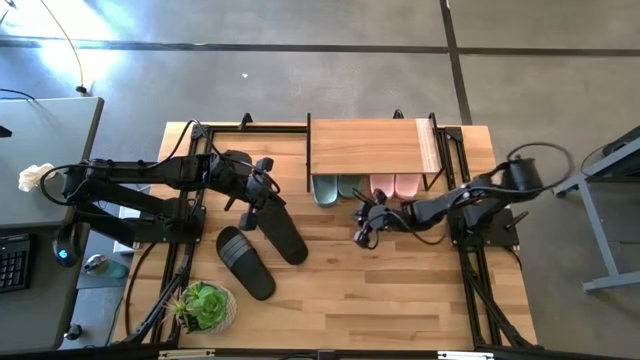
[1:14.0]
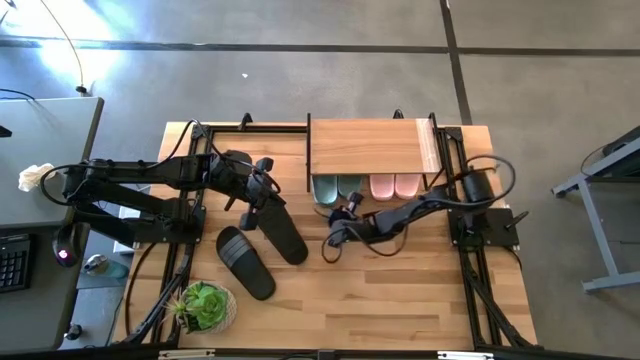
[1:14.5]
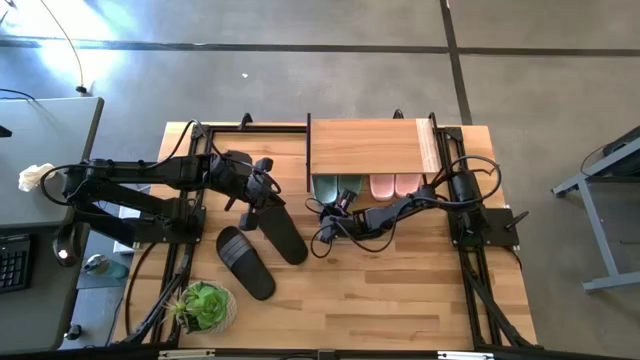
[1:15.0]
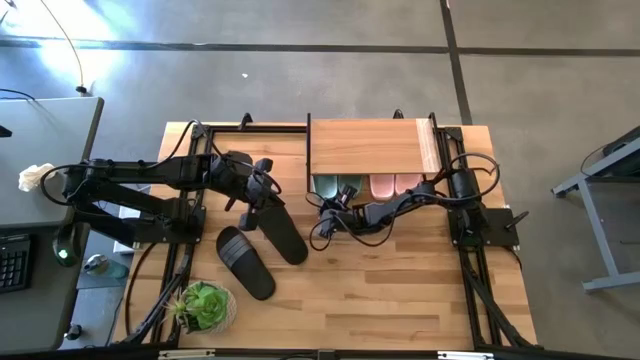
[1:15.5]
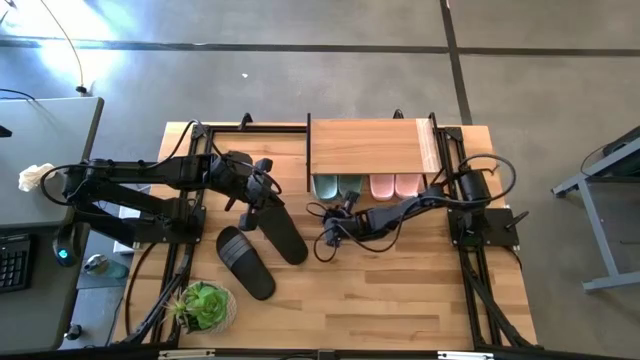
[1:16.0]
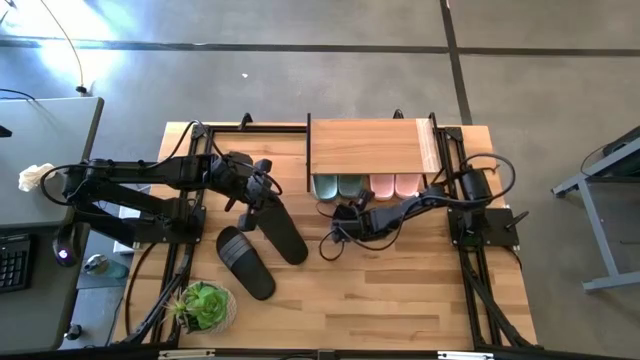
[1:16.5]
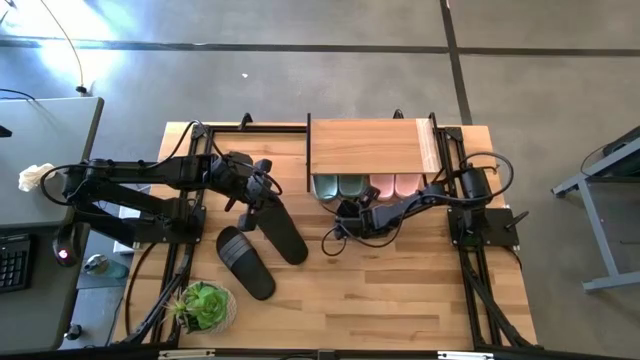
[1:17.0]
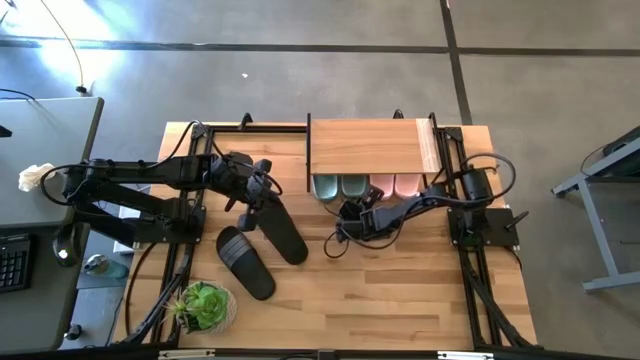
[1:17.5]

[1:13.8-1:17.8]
Task: Pick and place slides into the shelf
Adjust the pair of green slides

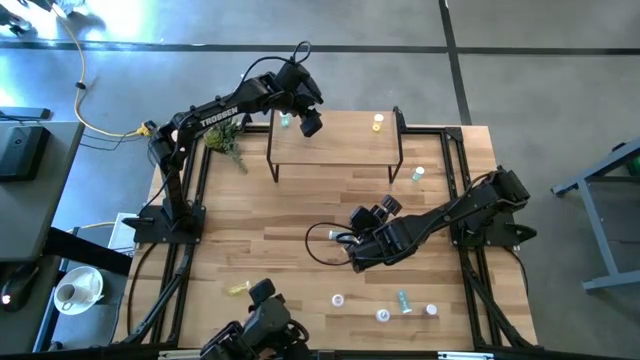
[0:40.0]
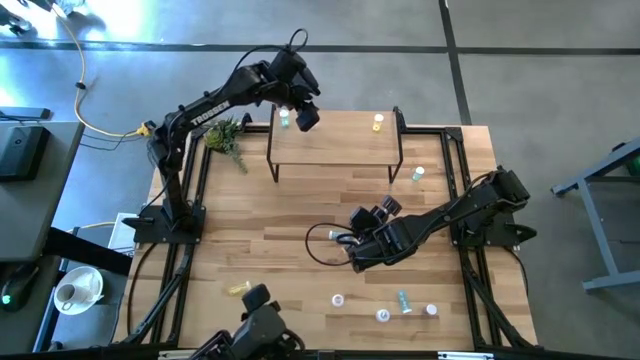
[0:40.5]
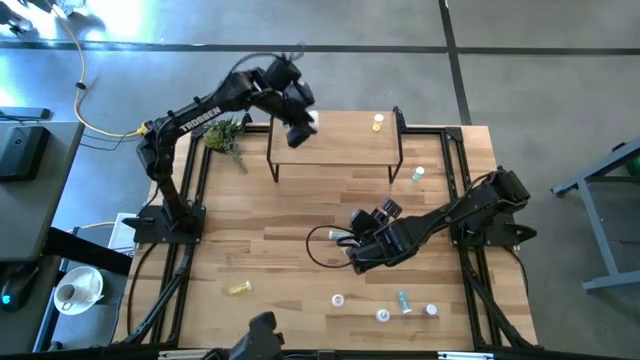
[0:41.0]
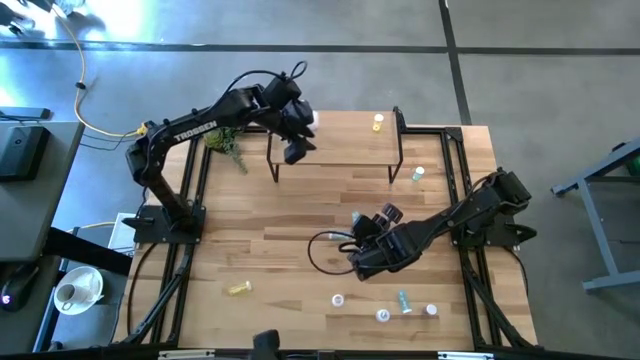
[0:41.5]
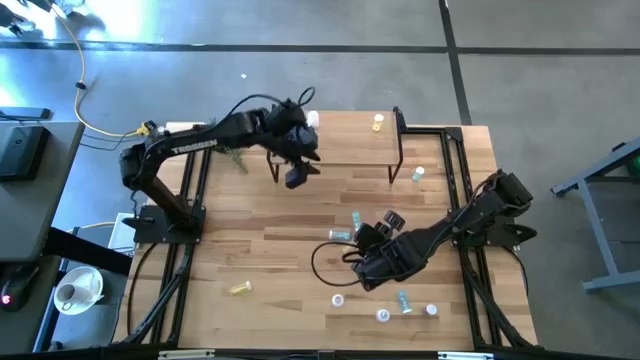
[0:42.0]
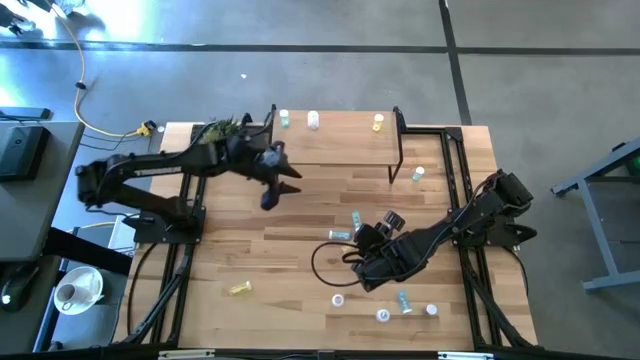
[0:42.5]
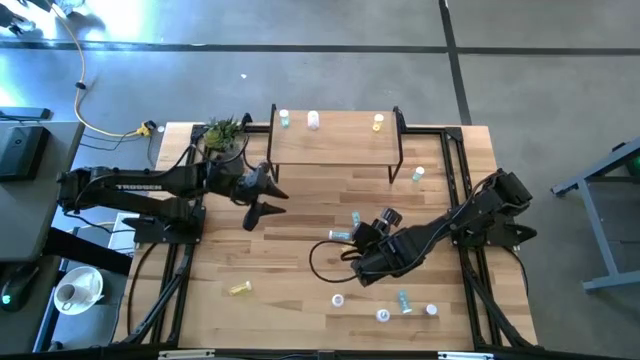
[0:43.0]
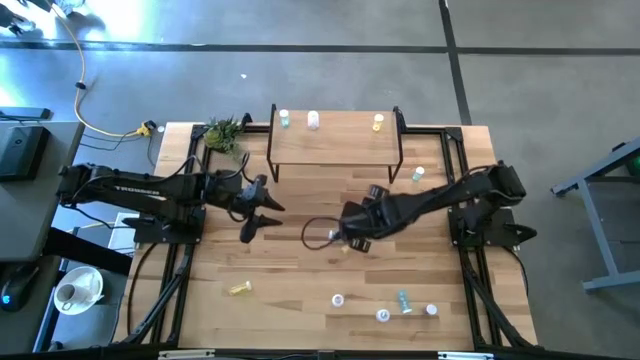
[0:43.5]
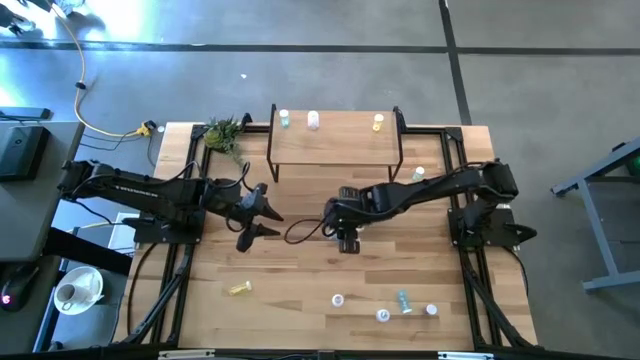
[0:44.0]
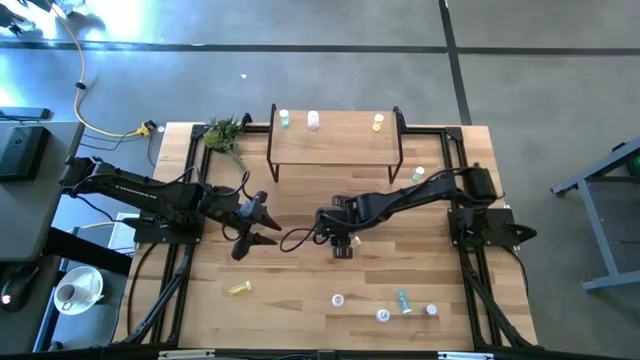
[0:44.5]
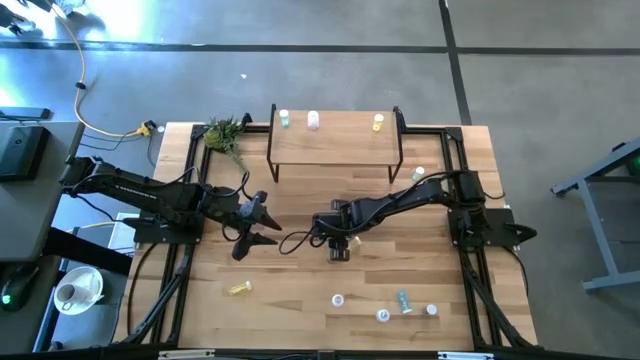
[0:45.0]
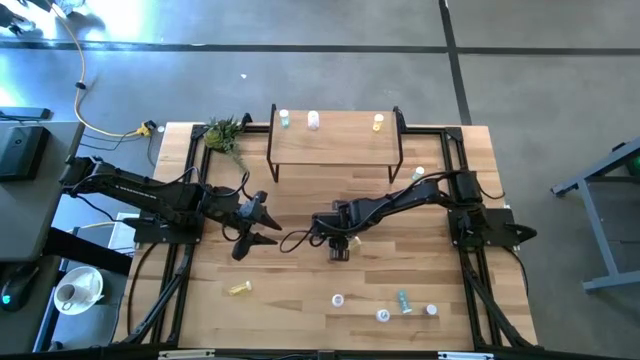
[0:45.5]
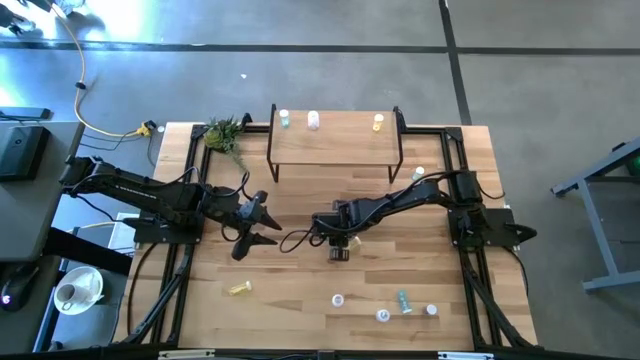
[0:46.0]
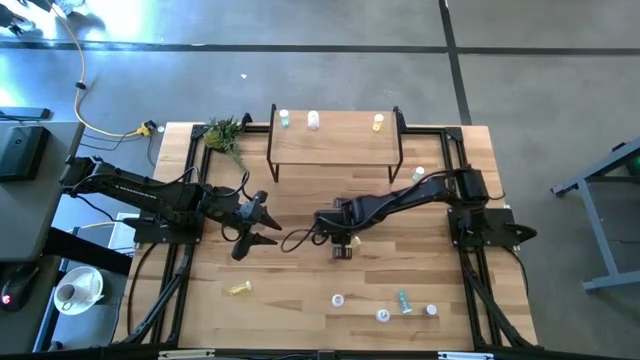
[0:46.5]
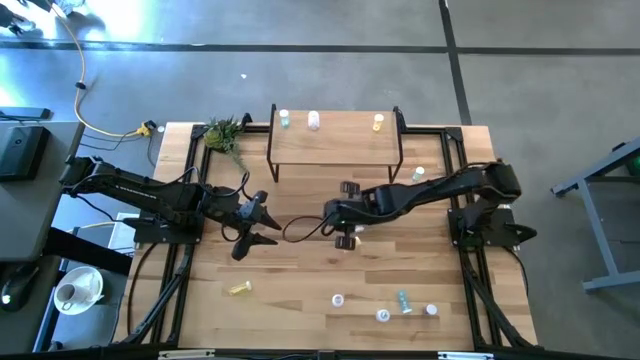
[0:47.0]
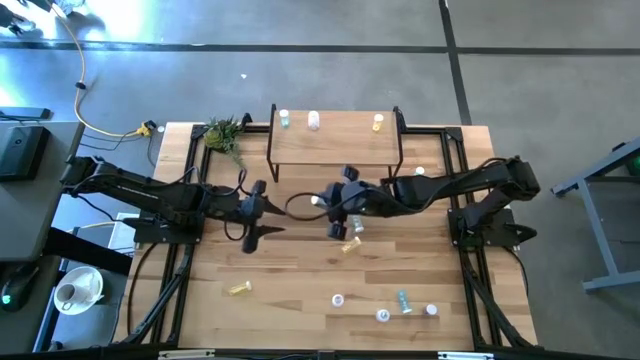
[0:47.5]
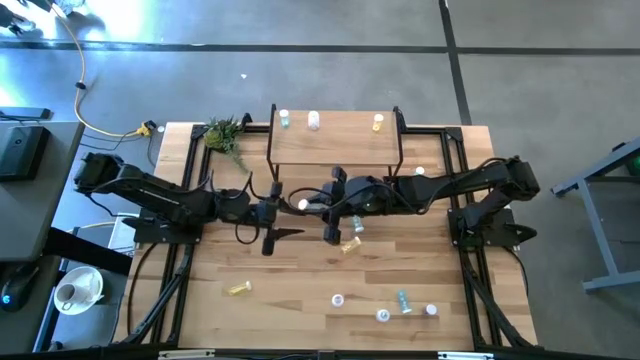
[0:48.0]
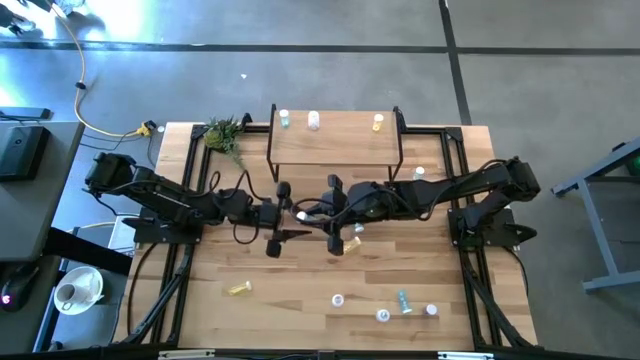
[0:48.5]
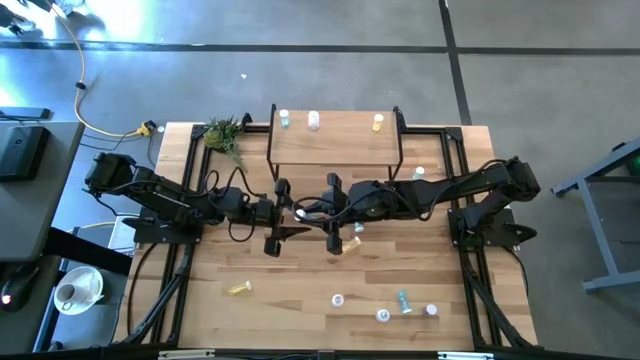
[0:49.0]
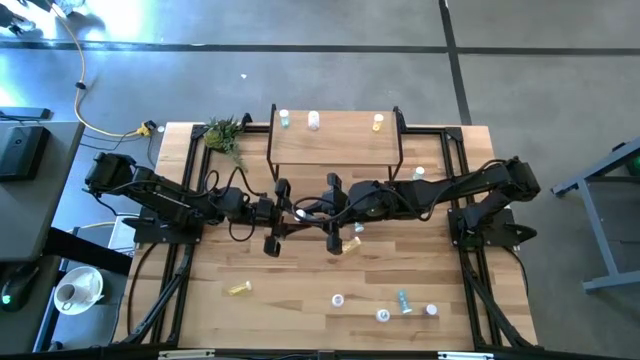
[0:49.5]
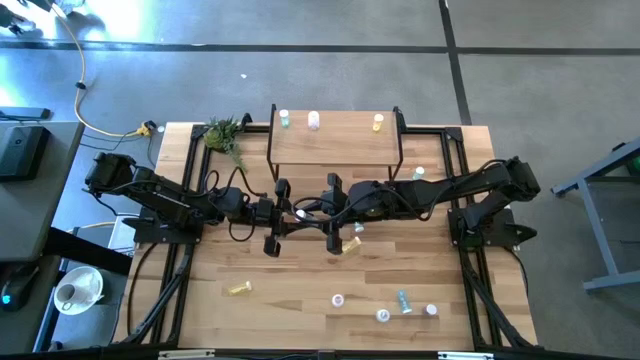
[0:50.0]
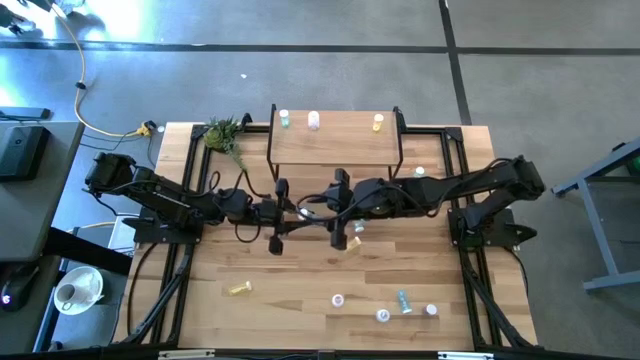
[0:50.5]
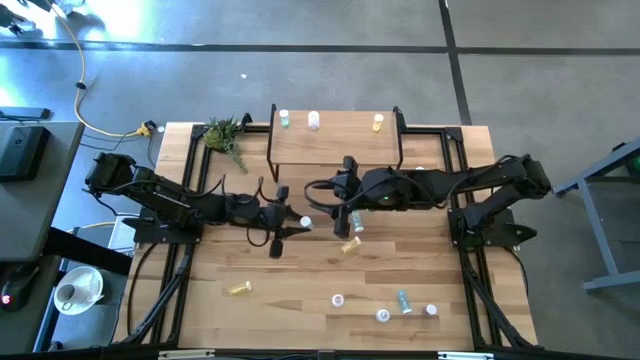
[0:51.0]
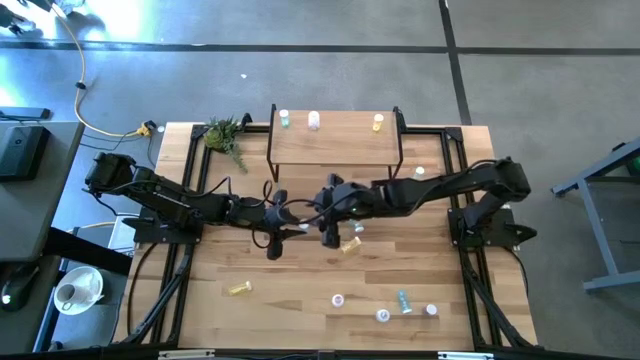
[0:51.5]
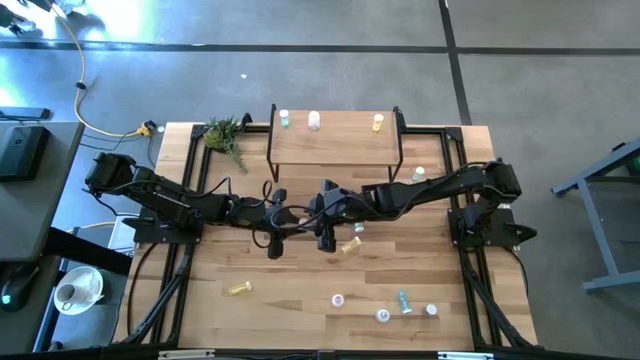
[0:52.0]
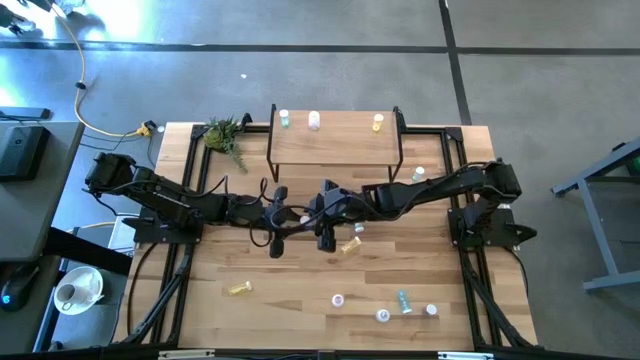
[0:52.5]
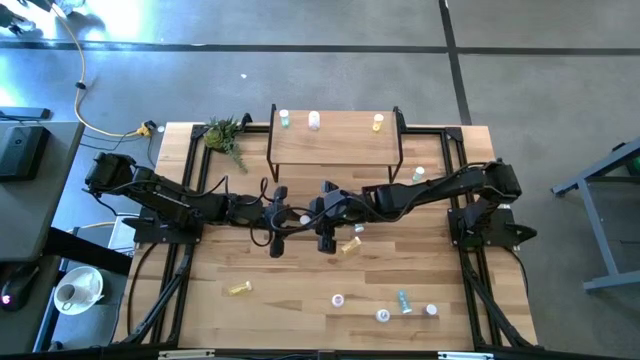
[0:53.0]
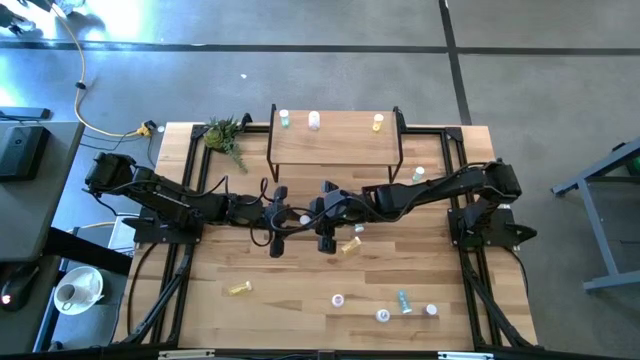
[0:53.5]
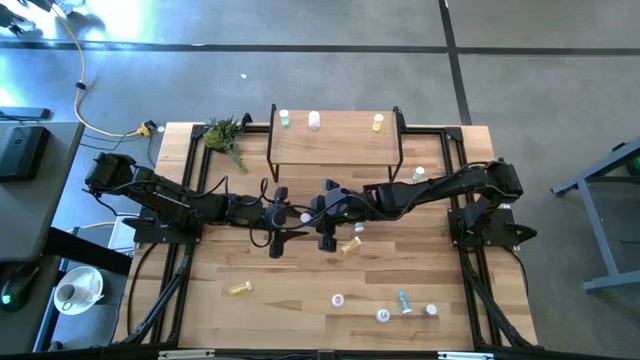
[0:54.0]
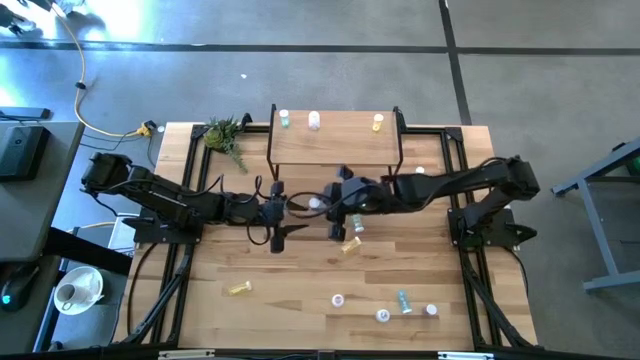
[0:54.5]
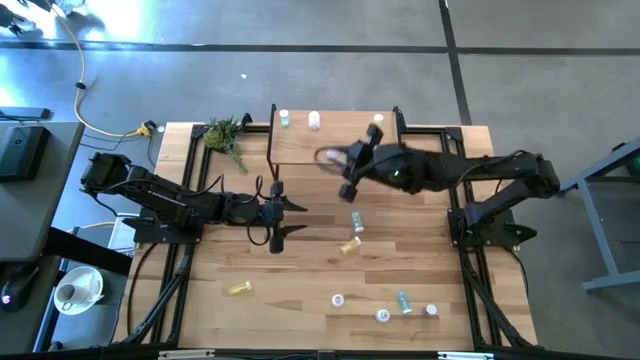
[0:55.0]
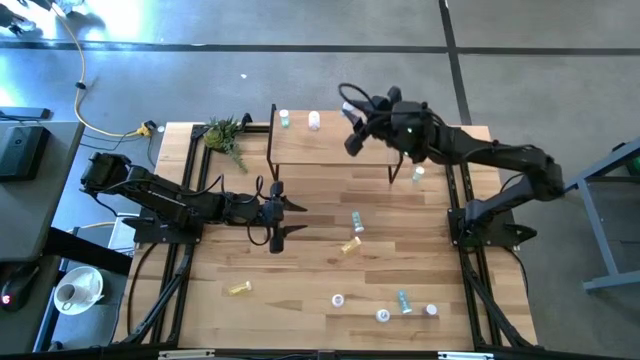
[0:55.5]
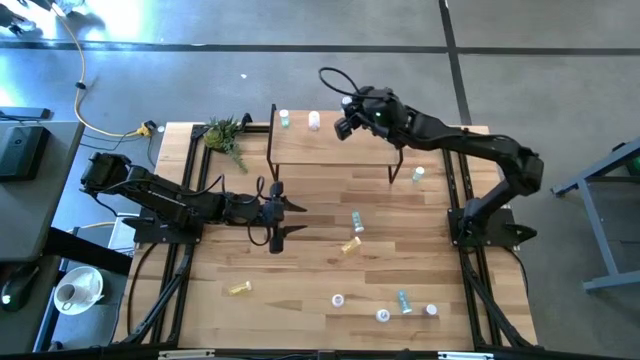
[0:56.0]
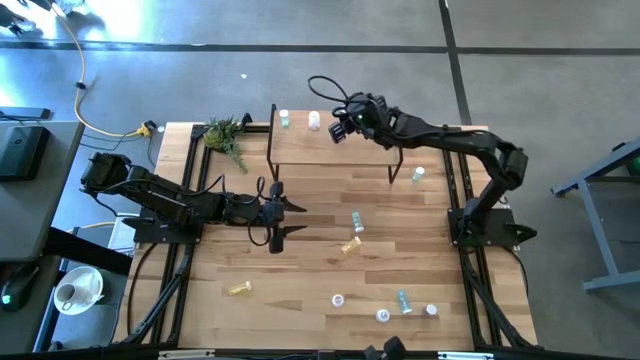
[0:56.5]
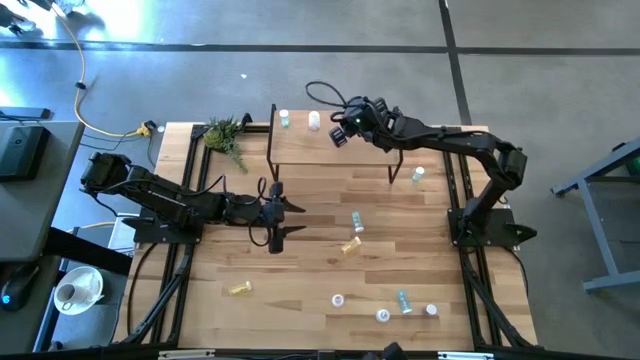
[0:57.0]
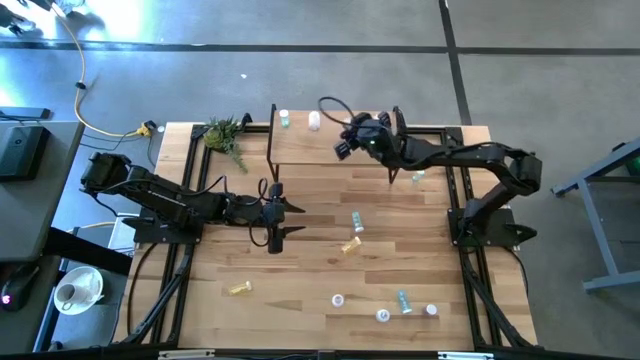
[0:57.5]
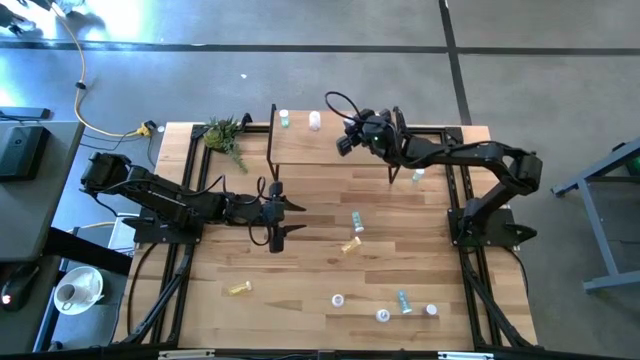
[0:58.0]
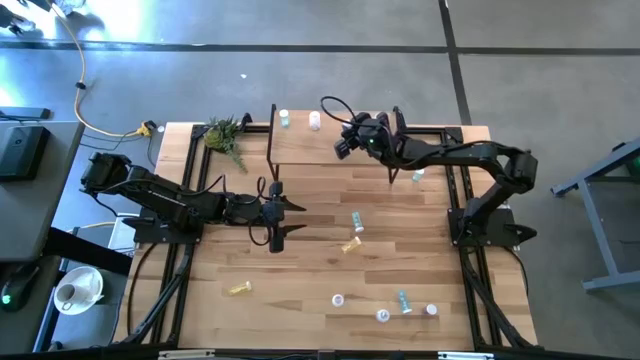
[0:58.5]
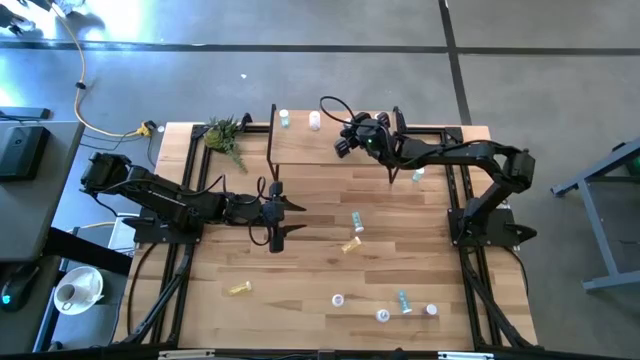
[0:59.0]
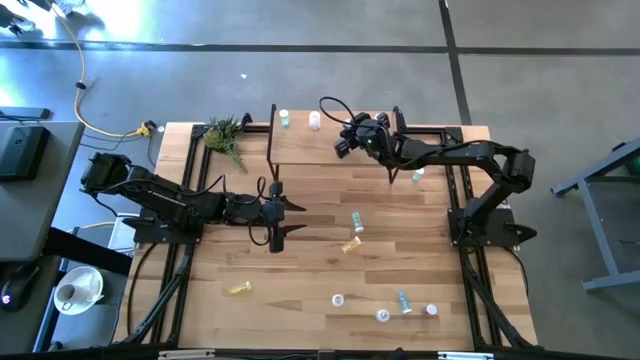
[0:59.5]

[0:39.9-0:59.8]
Task: Pick and place medicine bottles onto shelf by color
Put the middle blue pill bottle on the shelf
